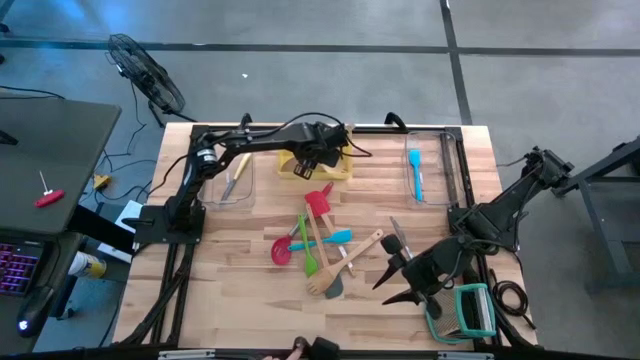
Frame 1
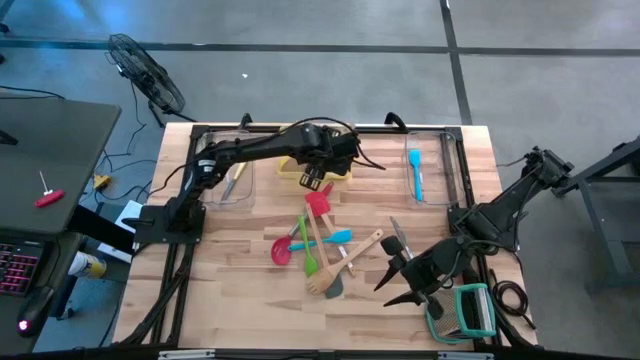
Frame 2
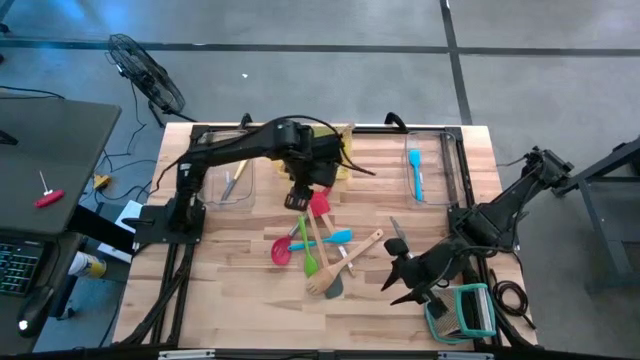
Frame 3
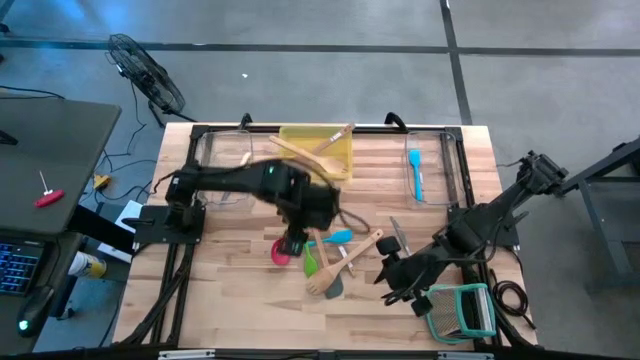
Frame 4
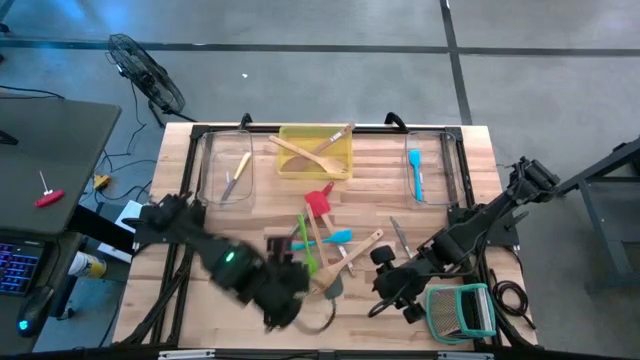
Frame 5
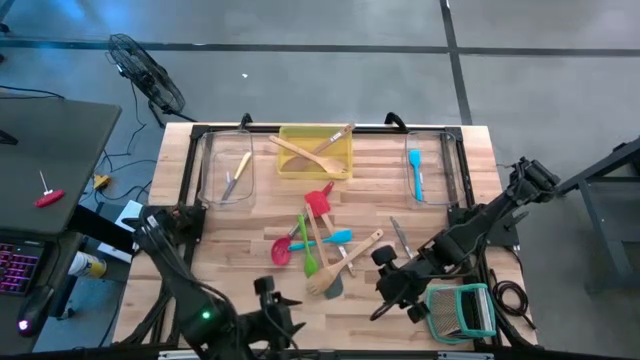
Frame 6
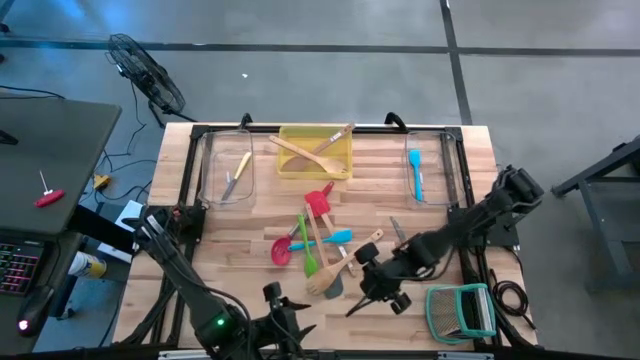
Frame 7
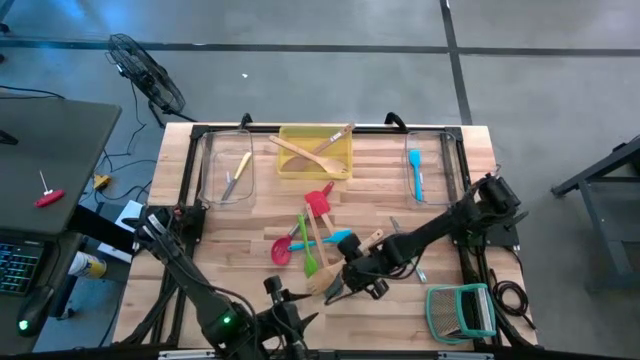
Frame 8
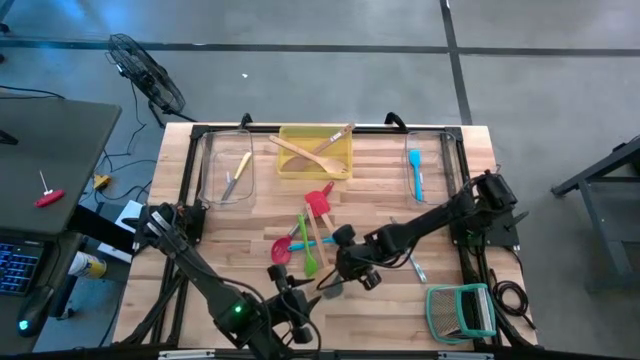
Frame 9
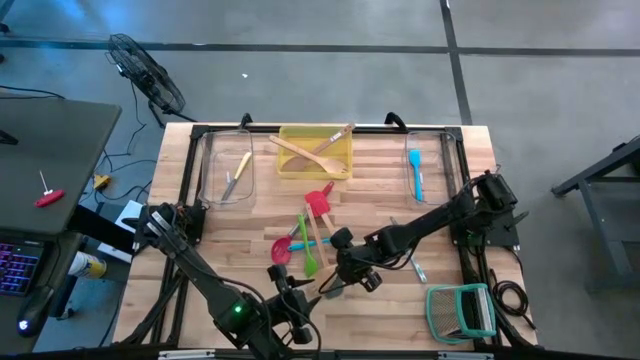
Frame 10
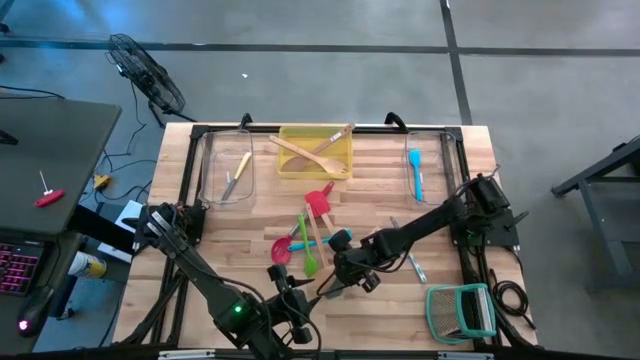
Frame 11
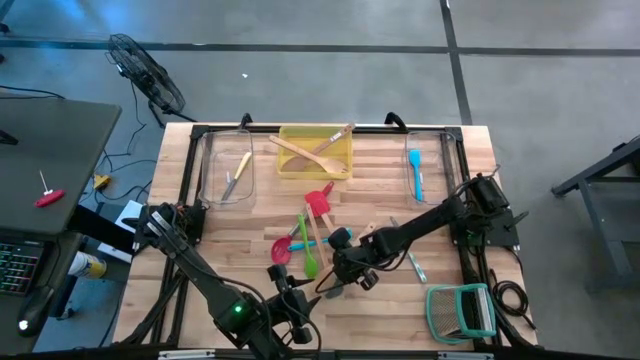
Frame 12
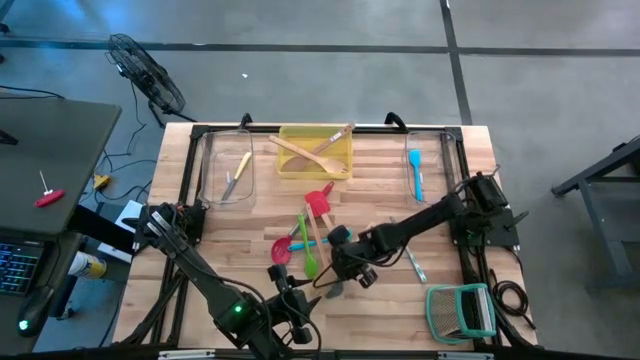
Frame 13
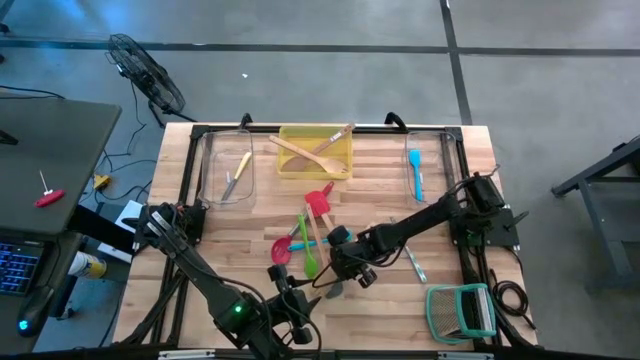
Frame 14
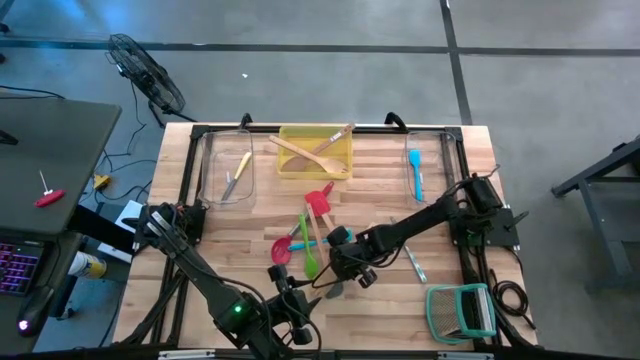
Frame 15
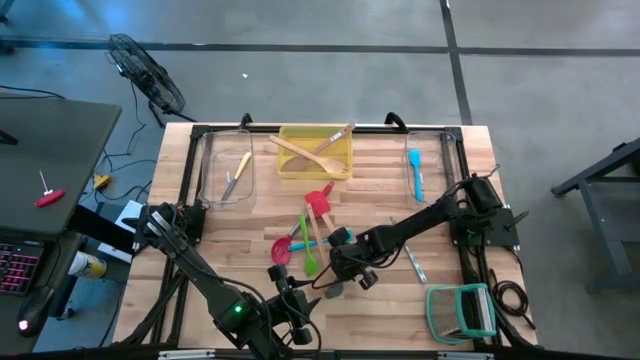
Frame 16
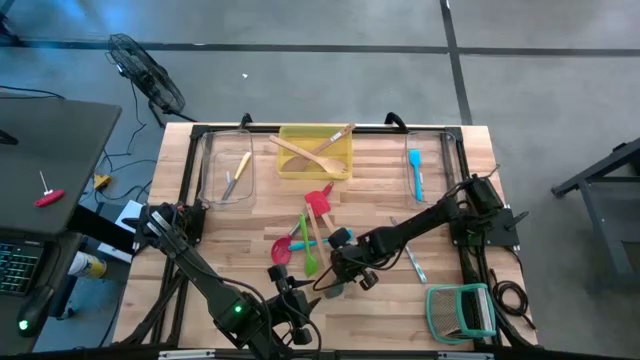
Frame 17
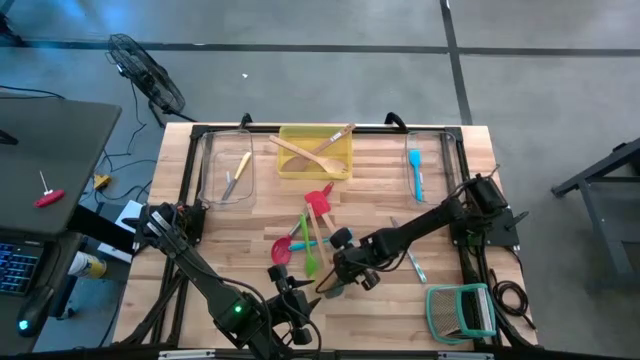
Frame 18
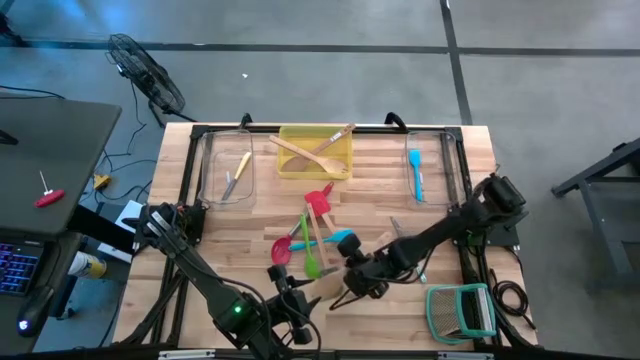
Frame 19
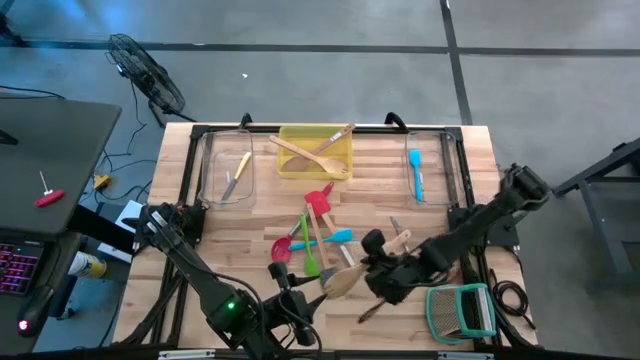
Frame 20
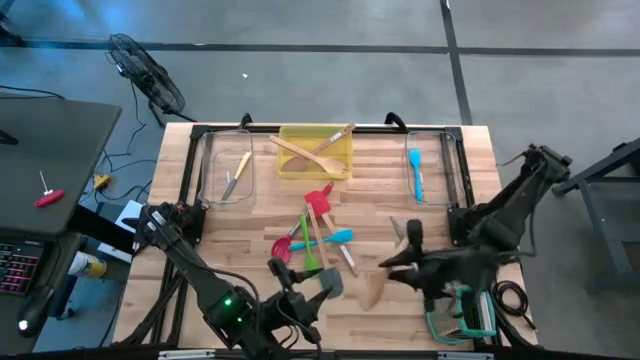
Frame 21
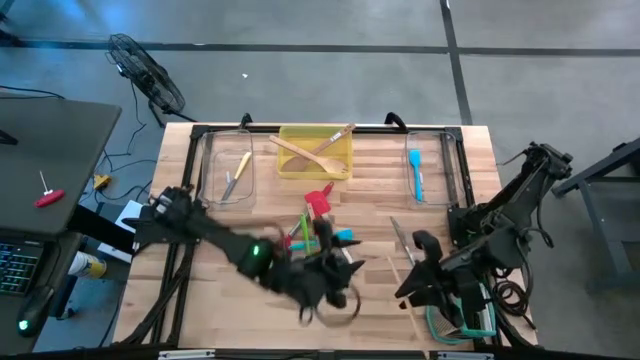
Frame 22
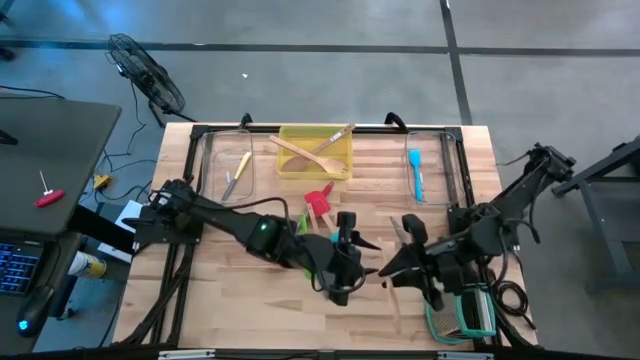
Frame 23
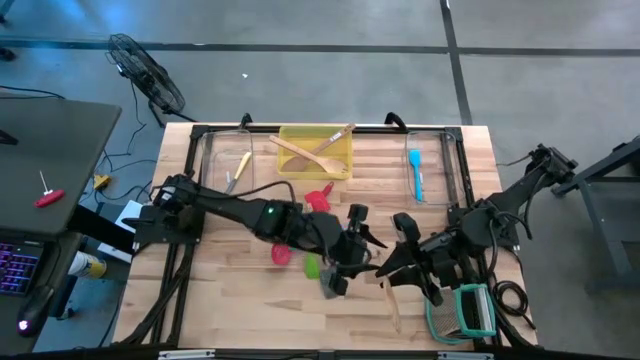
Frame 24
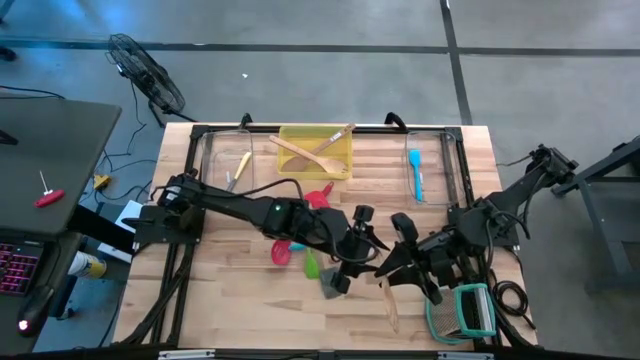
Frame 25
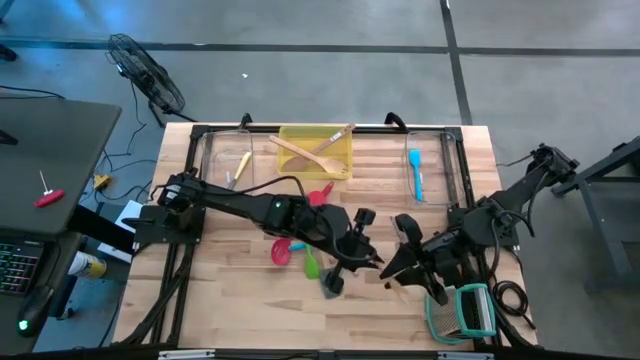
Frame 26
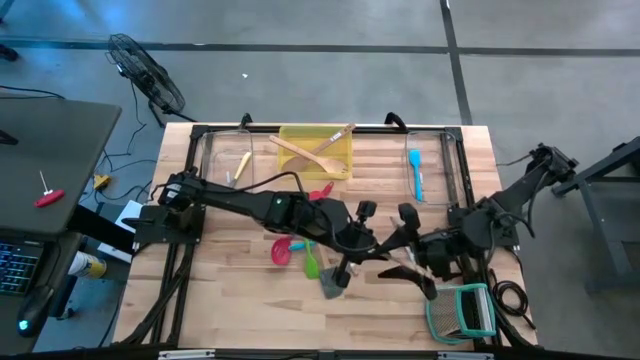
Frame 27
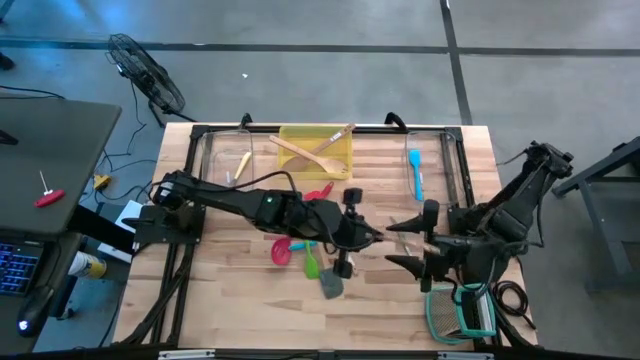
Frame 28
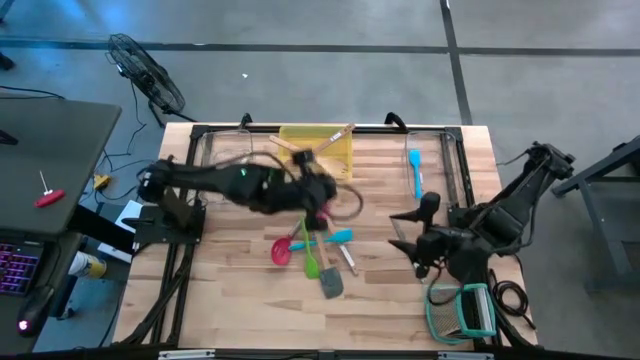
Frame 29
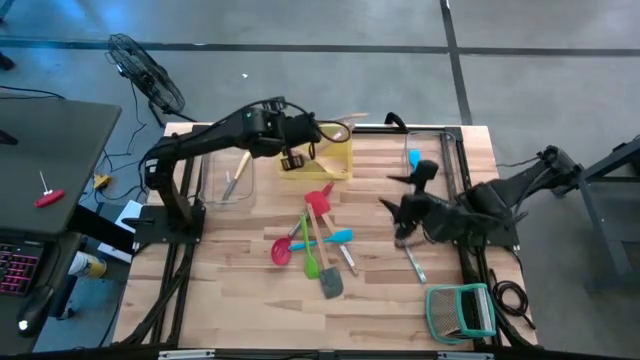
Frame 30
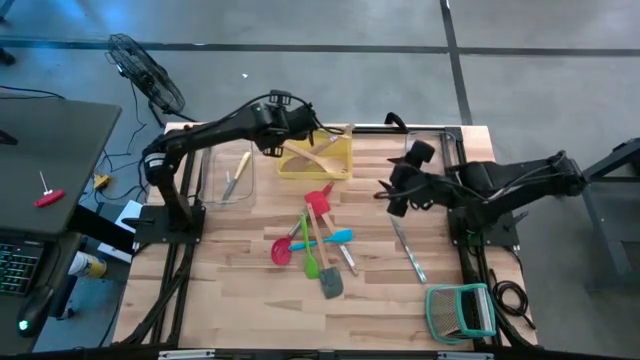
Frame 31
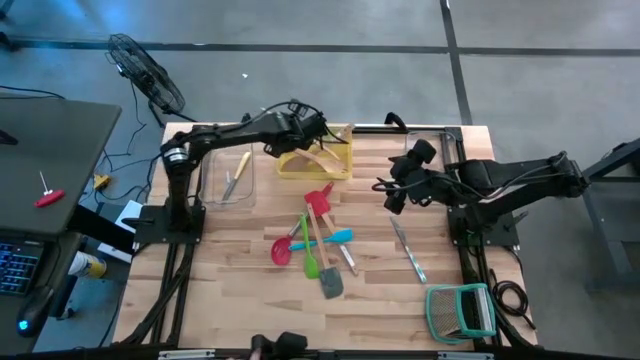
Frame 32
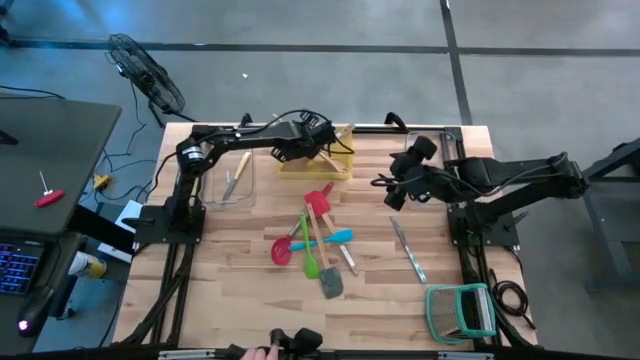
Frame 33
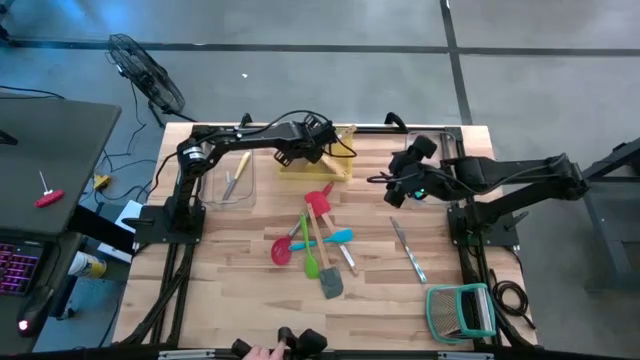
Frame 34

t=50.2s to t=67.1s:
Task: Pick & Place Kitchen Items
Put the wooden serving spoon into the yellow bin

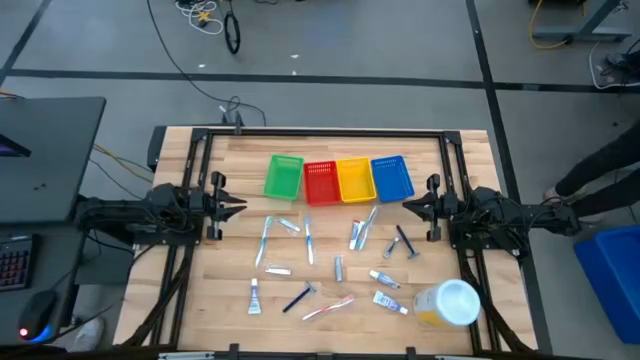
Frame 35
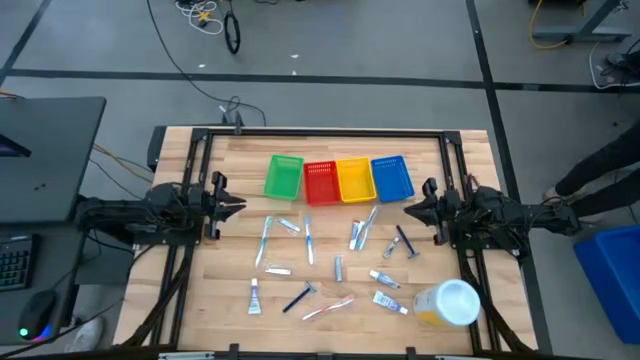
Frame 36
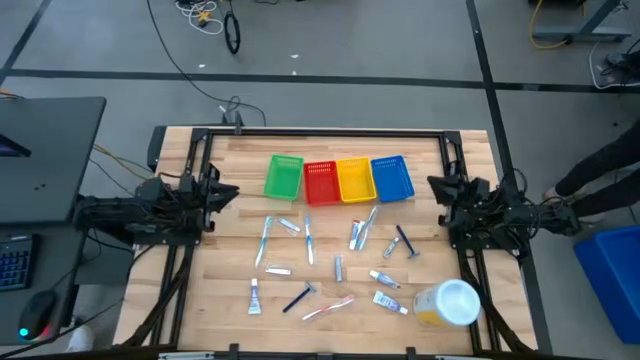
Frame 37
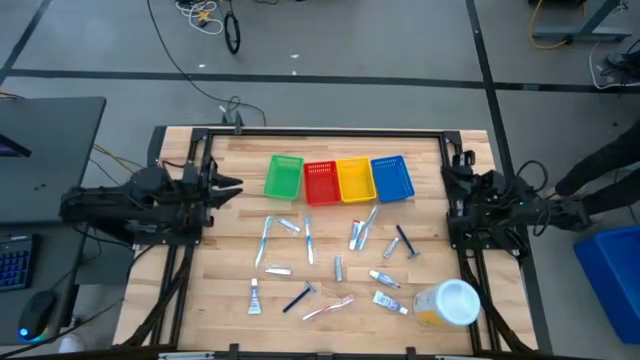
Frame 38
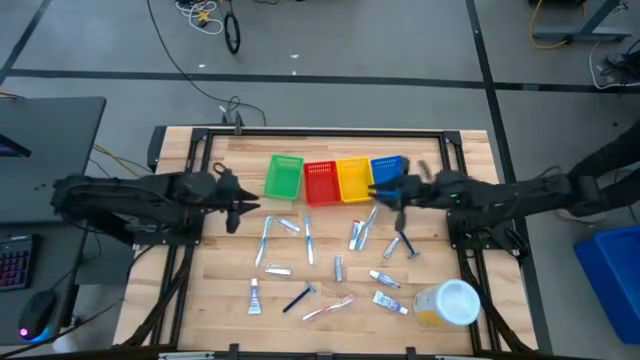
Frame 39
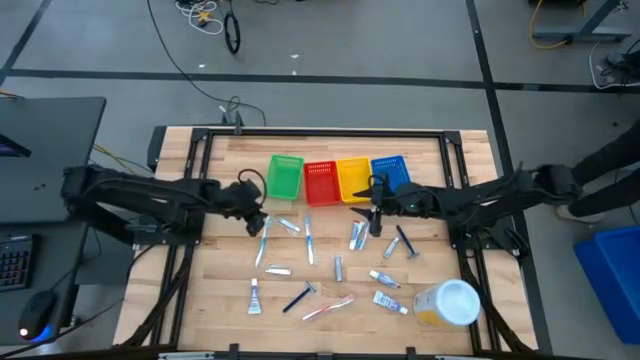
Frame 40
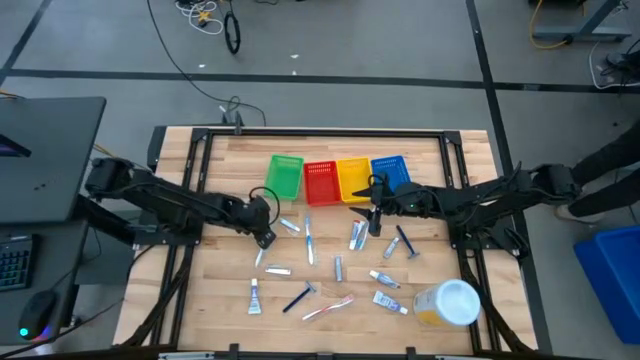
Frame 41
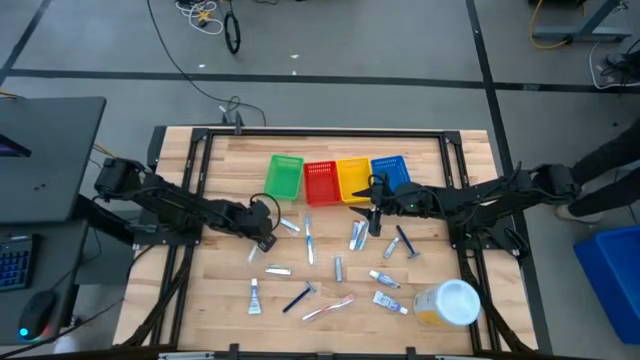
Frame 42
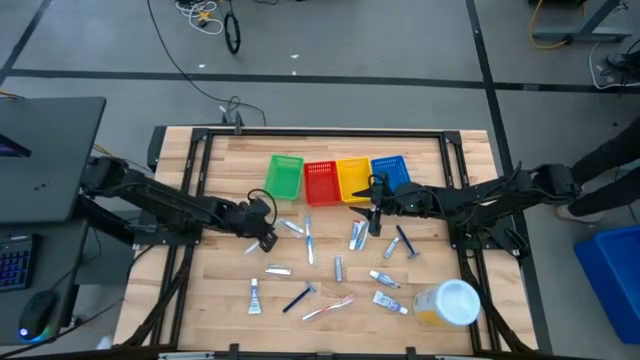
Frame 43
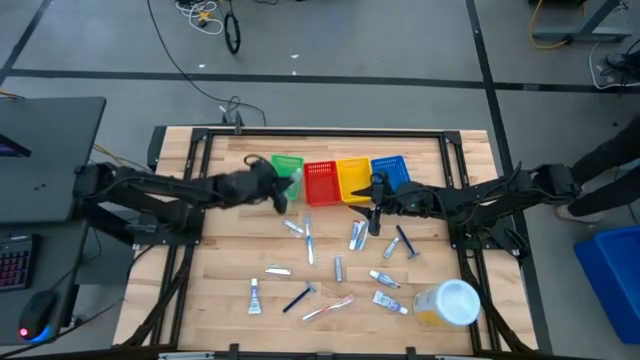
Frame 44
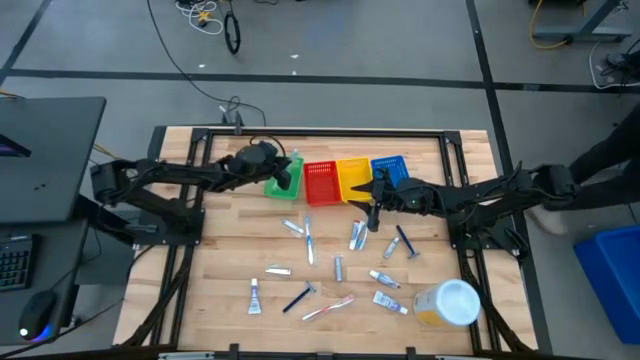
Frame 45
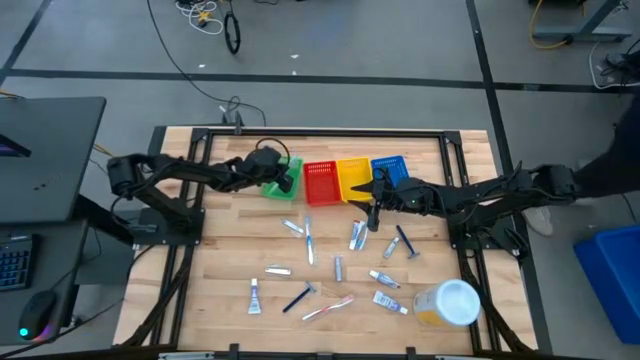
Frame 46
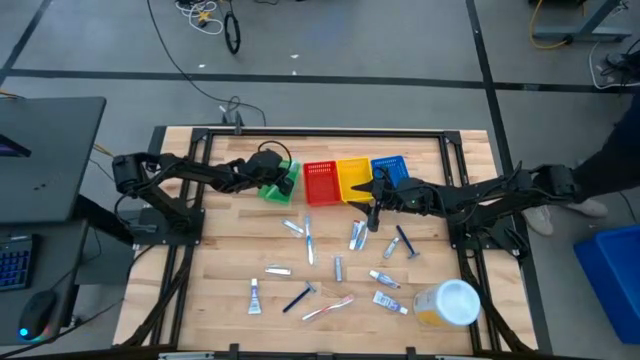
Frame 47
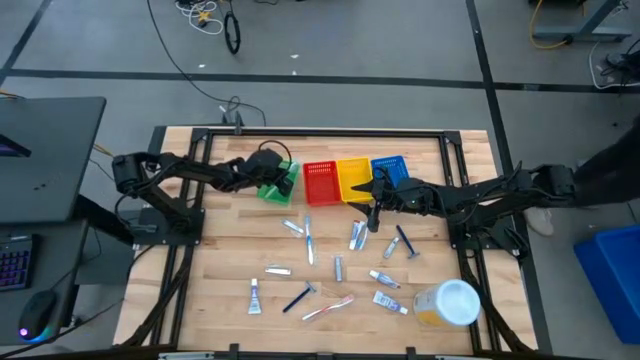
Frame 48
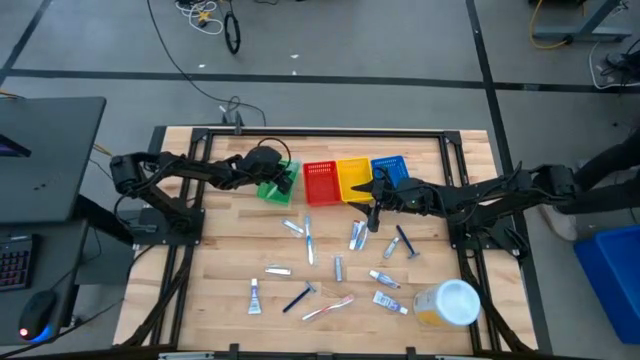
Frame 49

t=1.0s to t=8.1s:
Task: Pick & Place Travel size toiletries
Put the green toothbrush into the green bin
